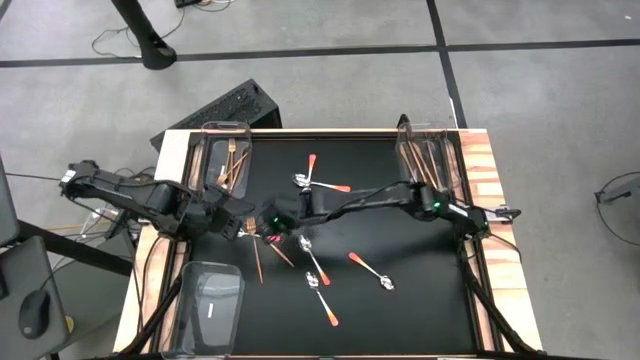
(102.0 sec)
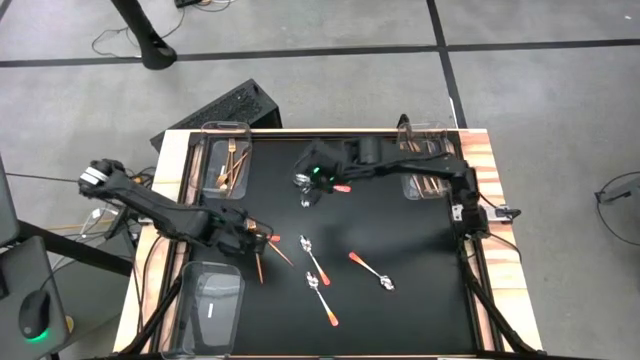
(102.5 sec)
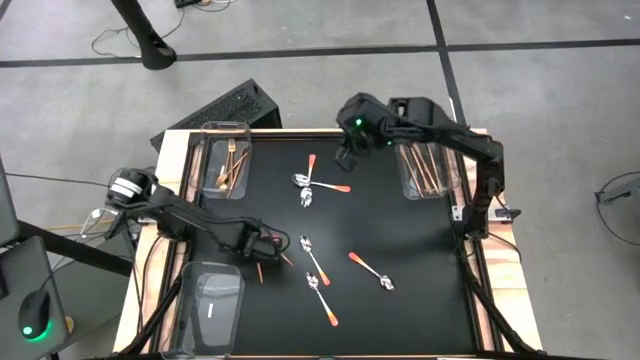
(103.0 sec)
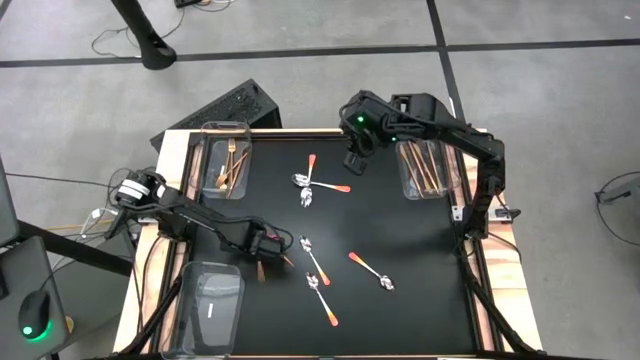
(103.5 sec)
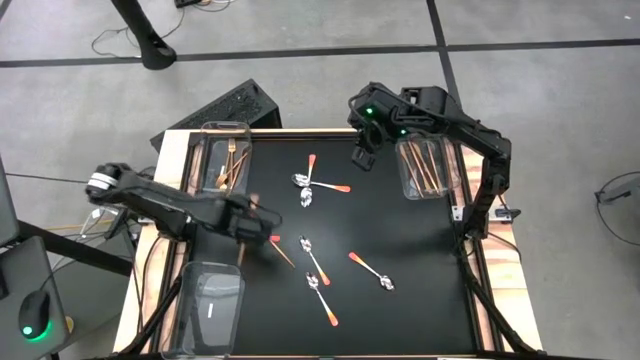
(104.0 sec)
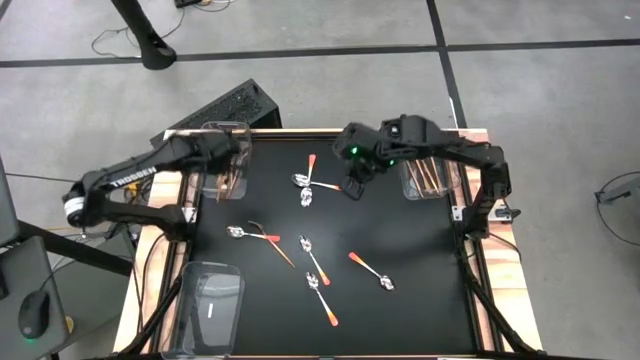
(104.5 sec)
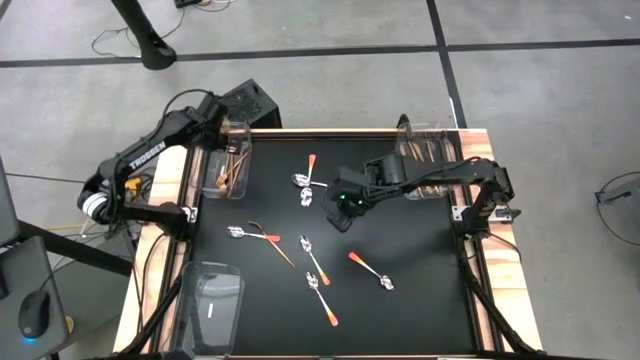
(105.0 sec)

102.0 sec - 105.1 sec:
Task: Sort silverware by color (type)
Put the gold fork into the top left transparent bin

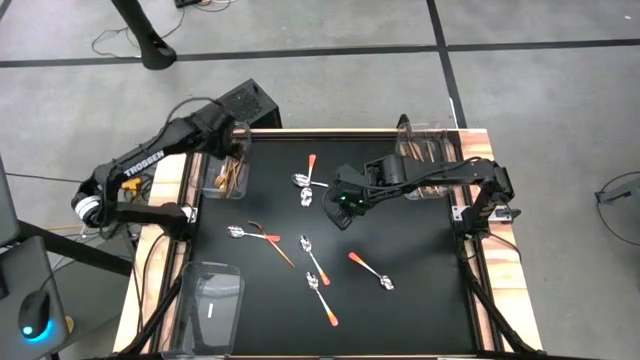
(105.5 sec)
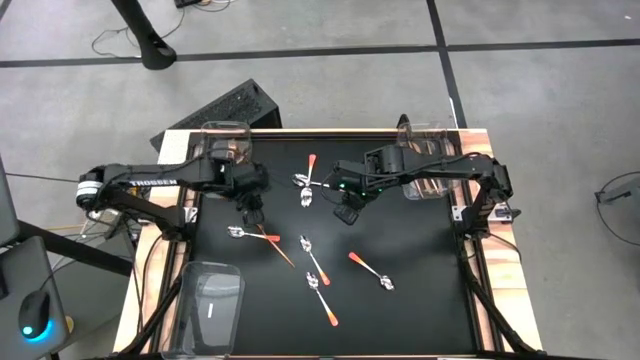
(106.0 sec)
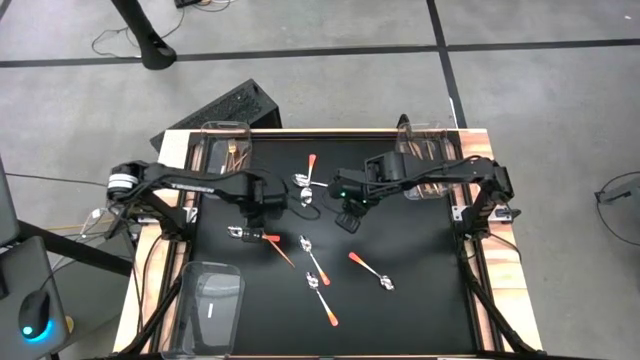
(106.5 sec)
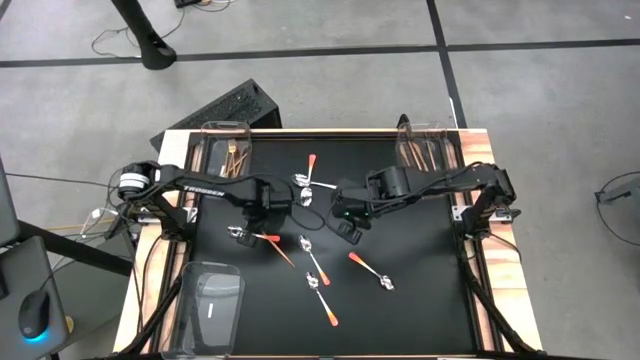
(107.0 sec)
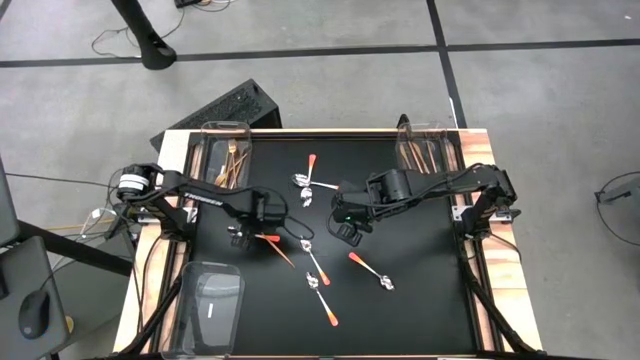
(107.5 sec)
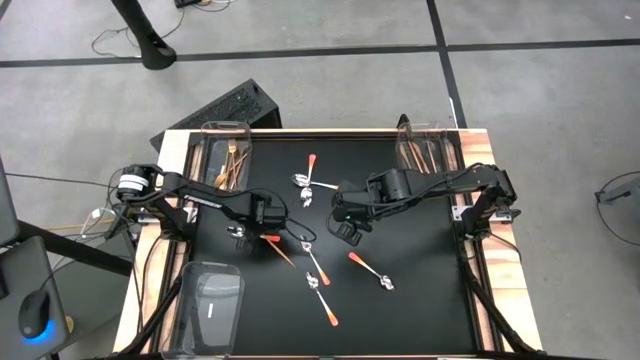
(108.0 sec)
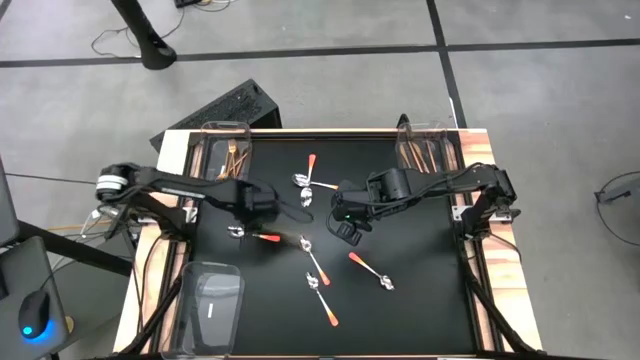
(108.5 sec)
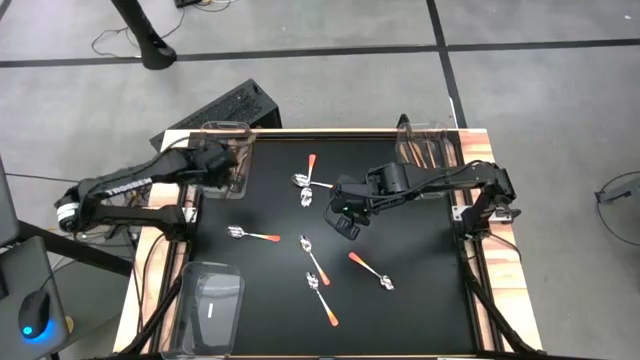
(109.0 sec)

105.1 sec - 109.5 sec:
Put the gold fork into the top left transparent bin

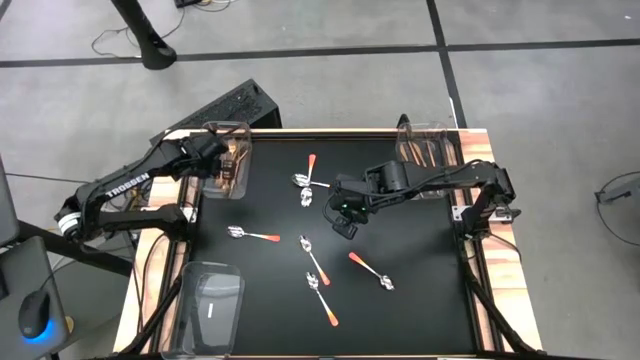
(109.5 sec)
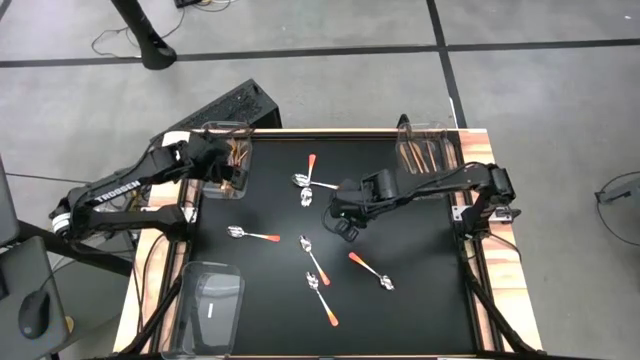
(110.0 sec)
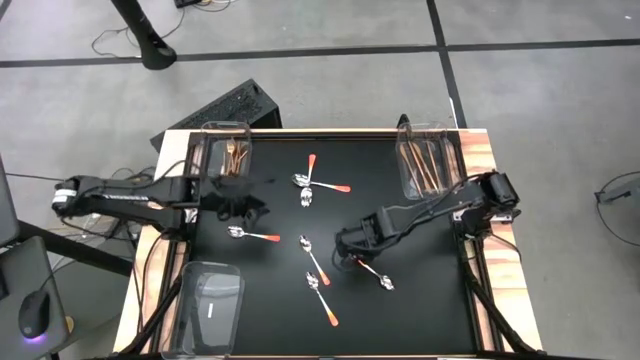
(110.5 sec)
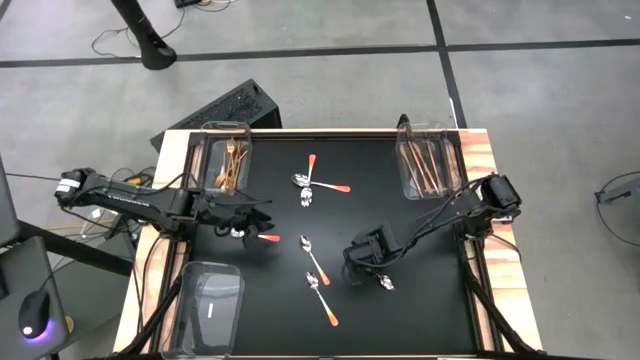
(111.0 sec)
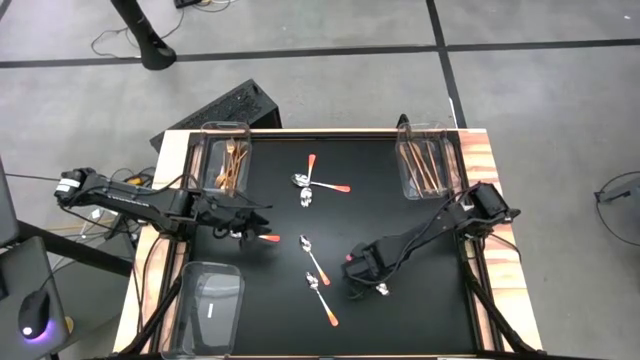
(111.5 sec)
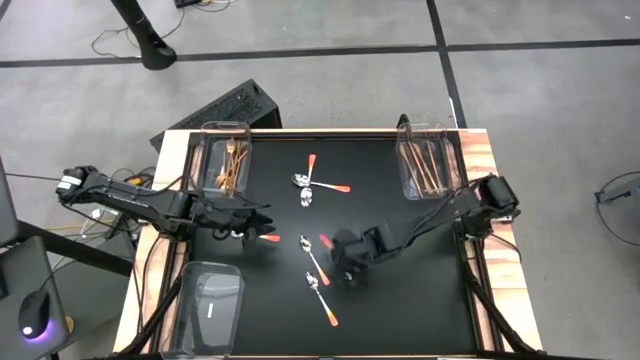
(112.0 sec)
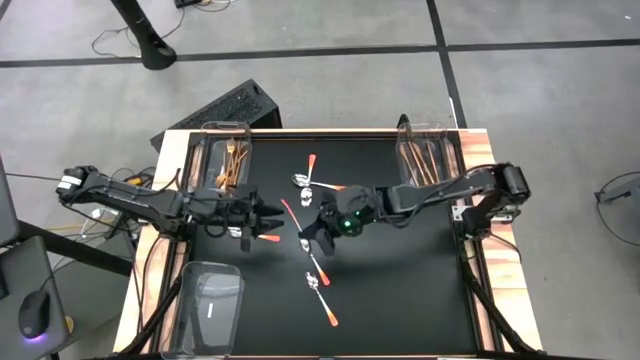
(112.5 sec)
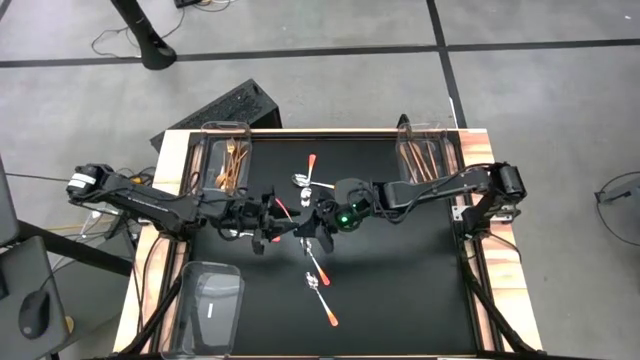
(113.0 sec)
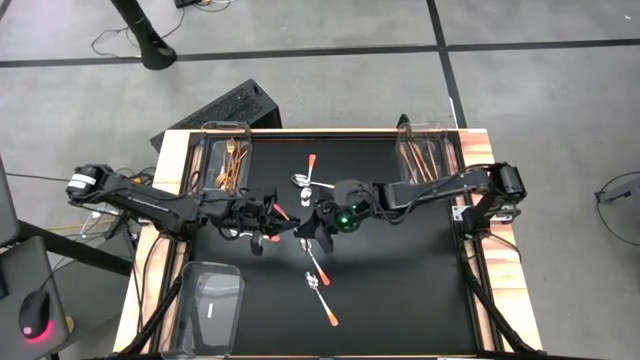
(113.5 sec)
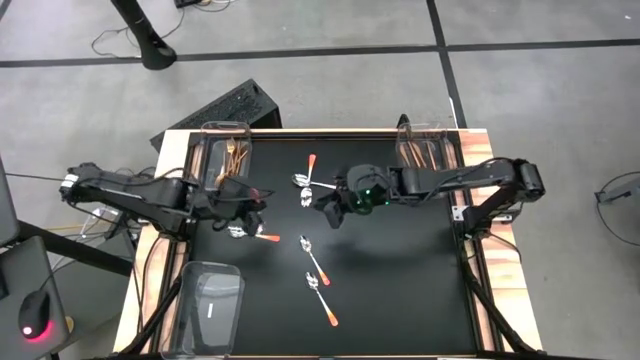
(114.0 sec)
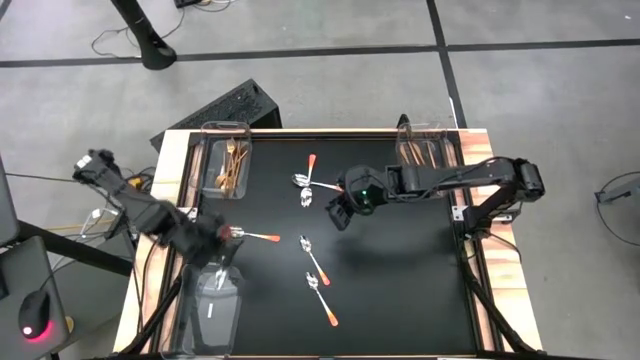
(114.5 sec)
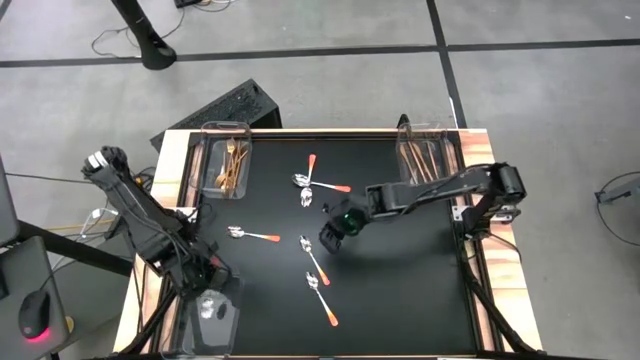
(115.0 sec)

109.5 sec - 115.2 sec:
Put the orange spoon into the bottom left transparent bin

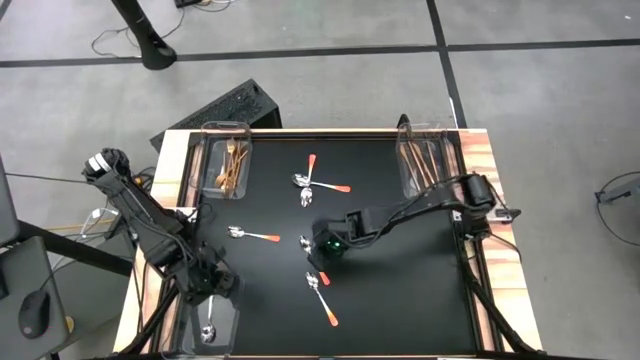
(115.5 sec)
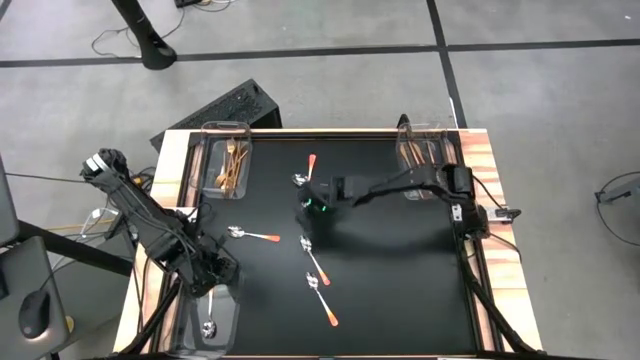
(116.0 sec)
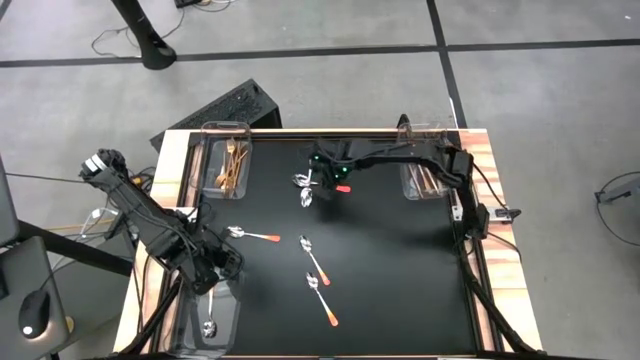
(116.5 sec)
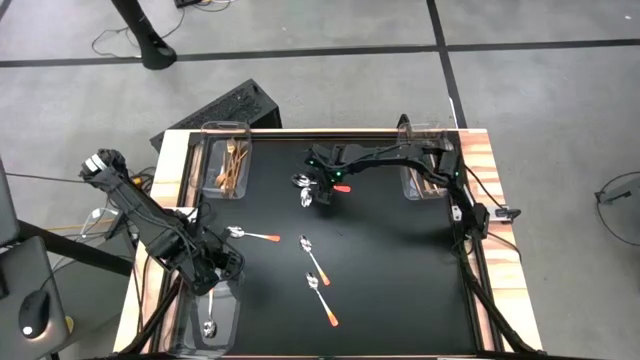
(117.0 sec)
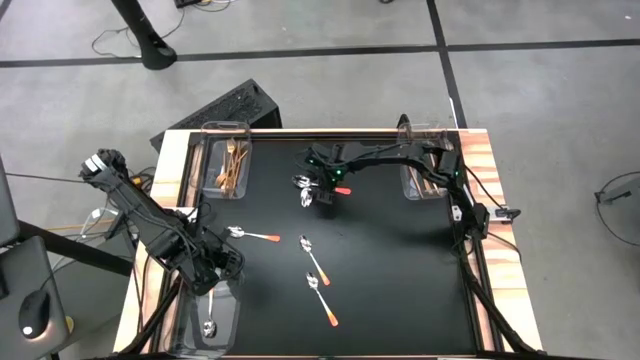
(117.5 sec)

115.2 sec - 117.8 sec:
Put the orange spoon into the bottom left transparent bin

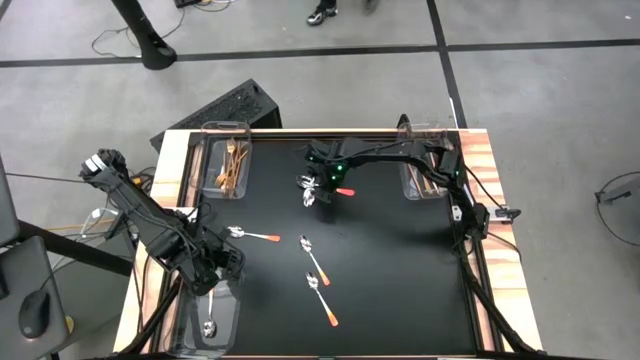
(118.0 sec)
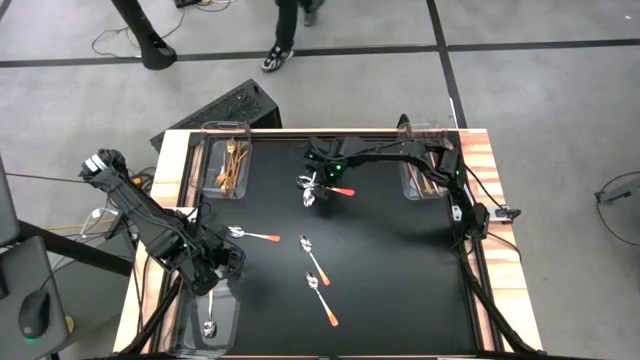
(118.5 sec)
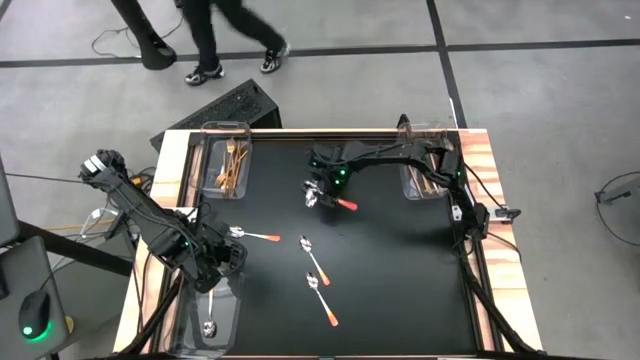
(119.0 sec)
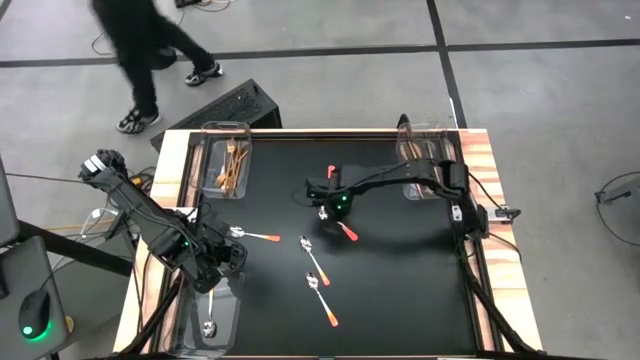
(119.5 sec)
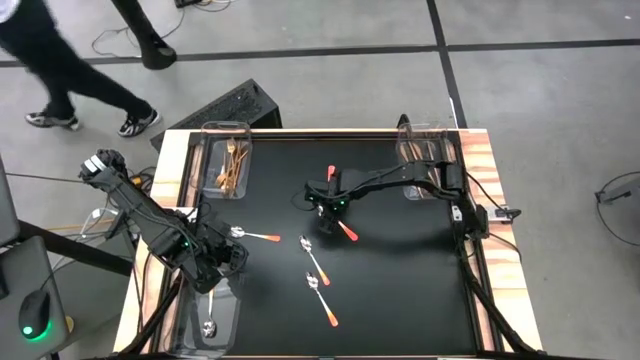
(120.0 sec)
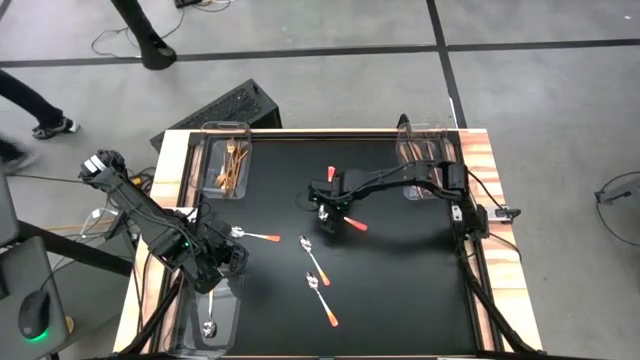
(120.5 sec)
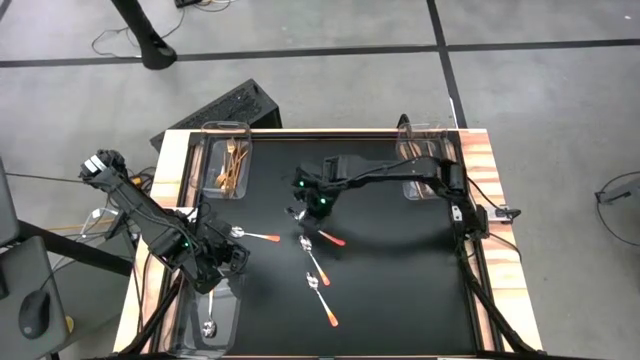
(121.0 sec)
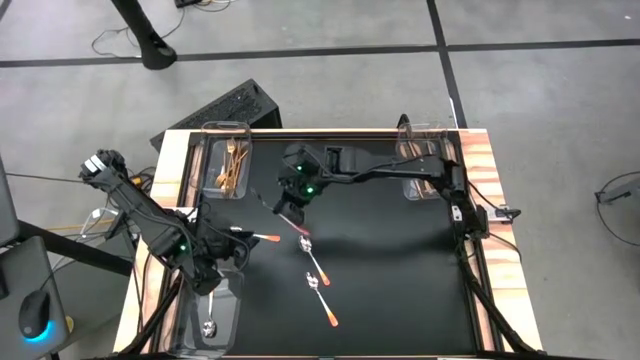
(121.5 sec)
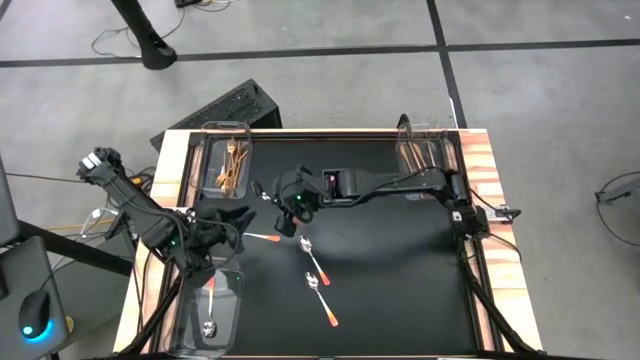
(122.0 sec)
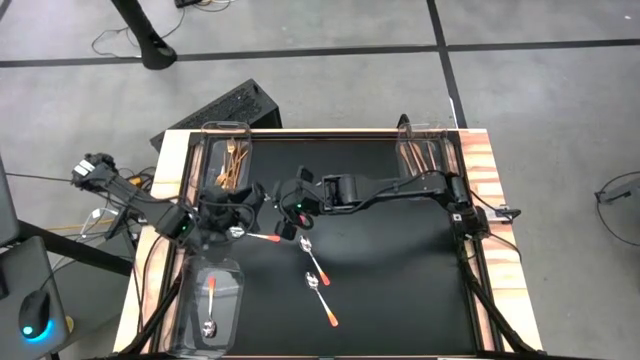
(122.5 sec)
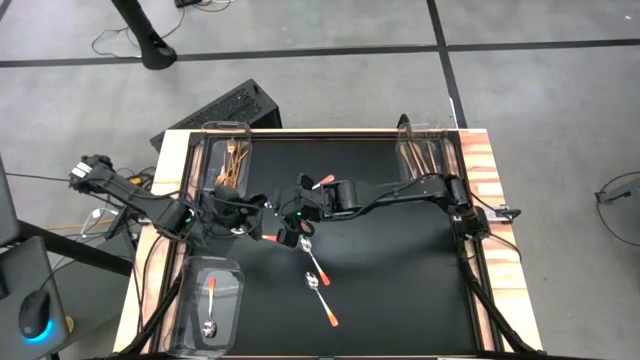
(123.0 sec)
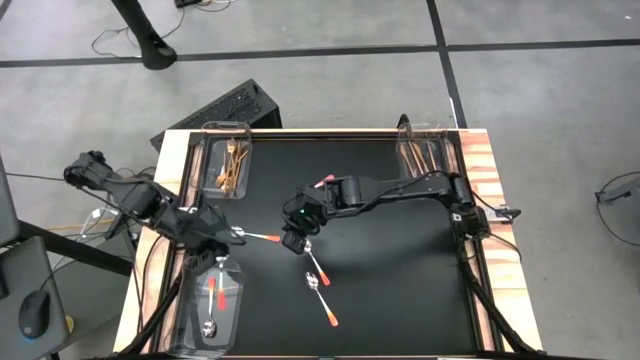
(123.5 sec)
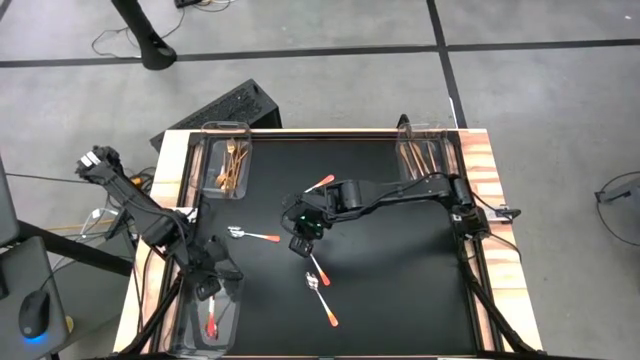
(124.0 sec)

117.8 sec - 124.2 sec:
Put the orange spoon into the bottom left transparent bin
